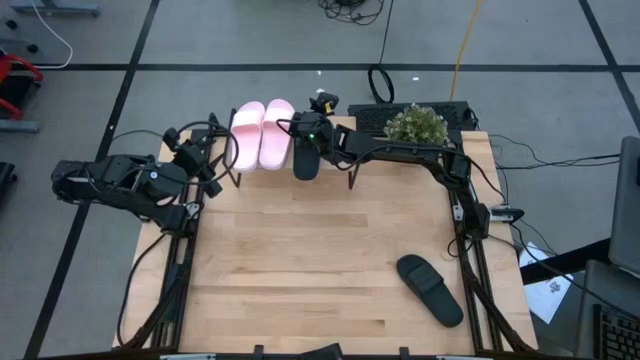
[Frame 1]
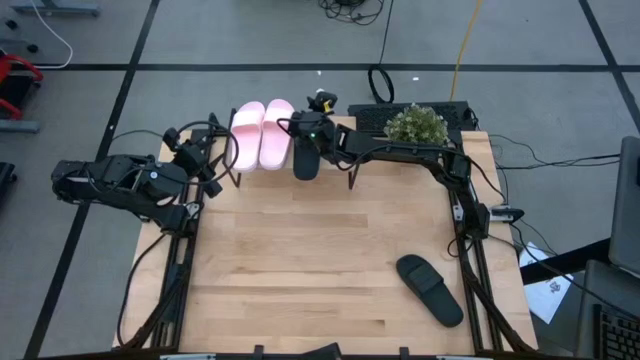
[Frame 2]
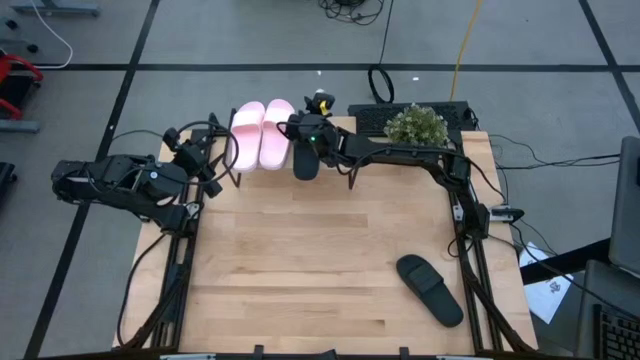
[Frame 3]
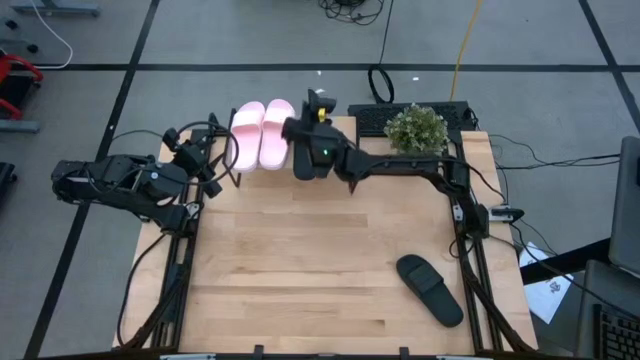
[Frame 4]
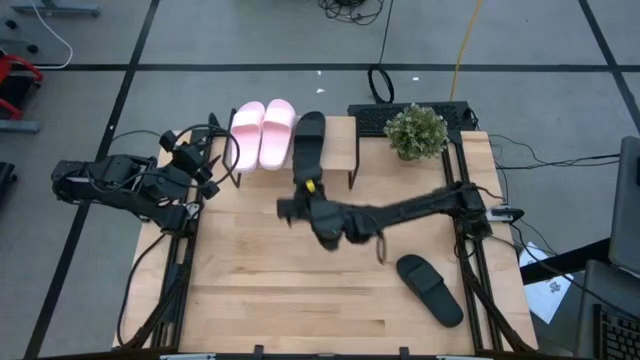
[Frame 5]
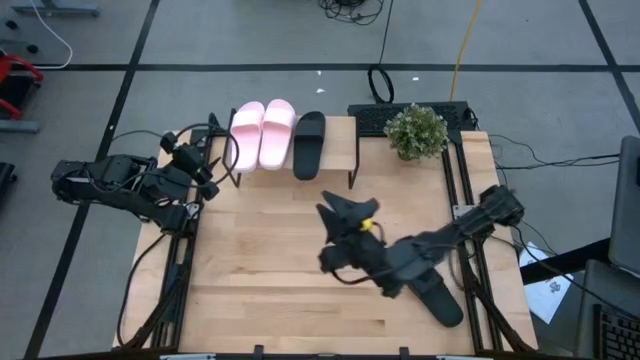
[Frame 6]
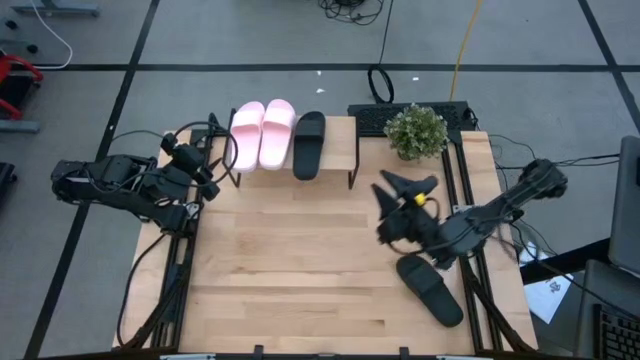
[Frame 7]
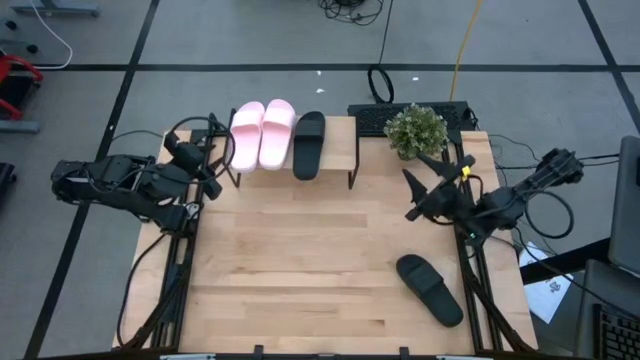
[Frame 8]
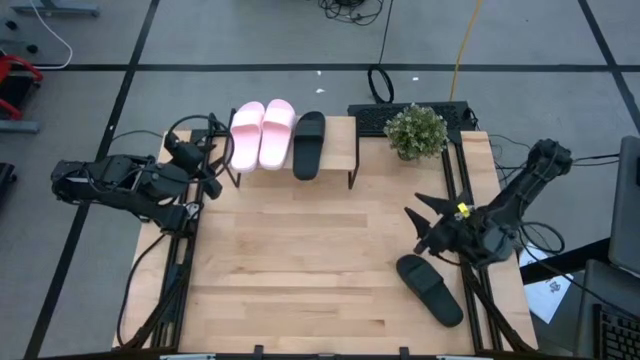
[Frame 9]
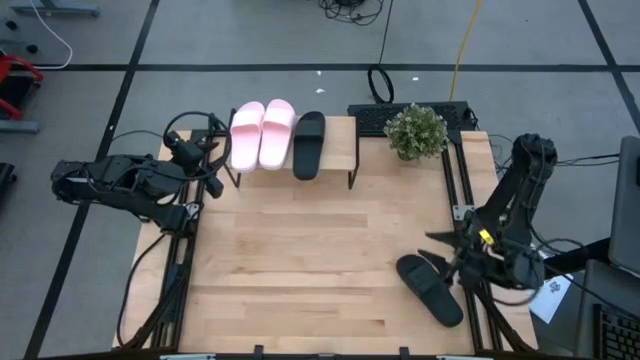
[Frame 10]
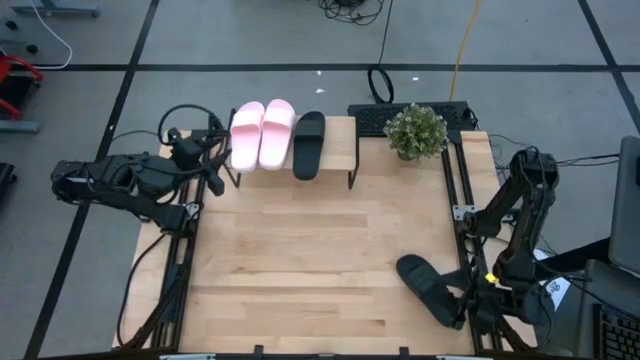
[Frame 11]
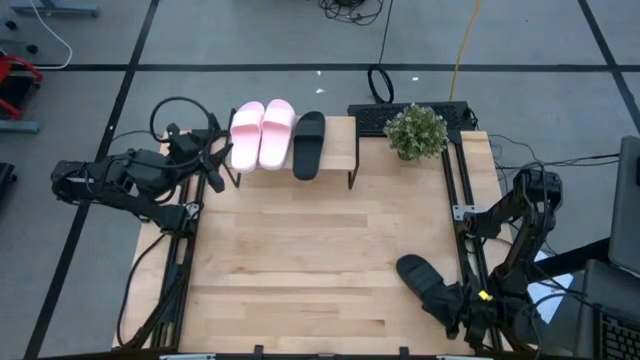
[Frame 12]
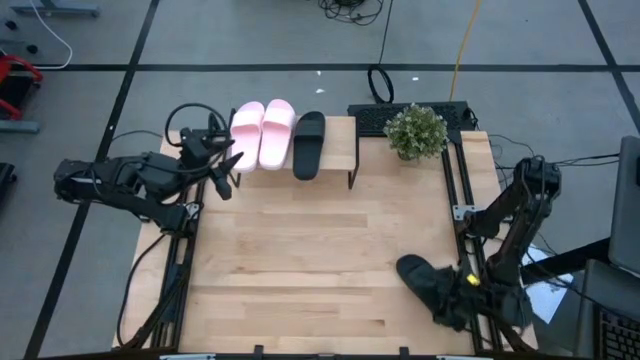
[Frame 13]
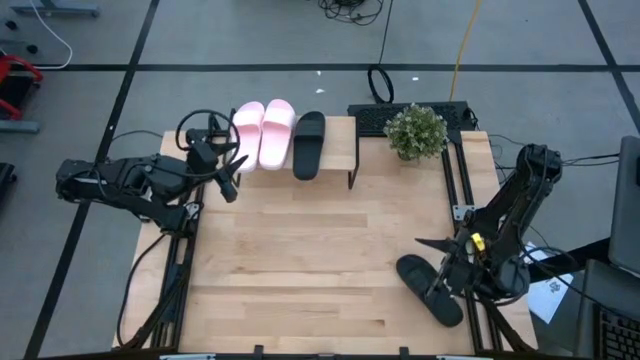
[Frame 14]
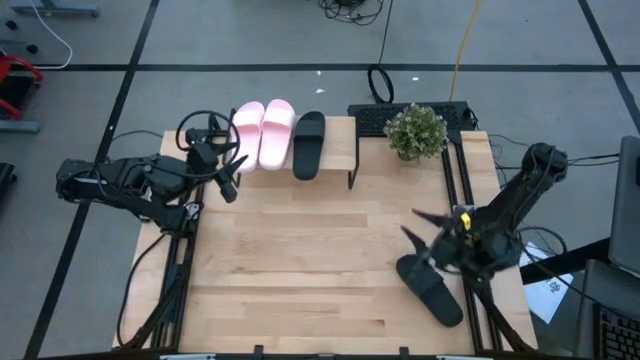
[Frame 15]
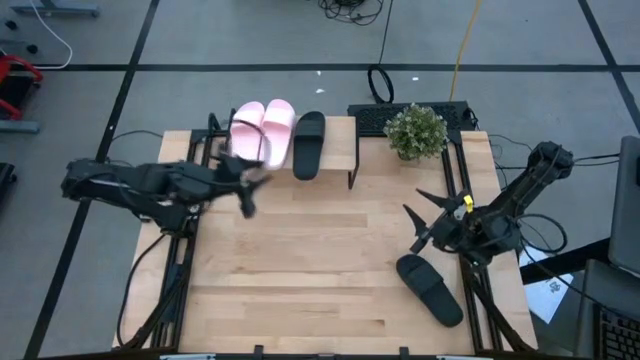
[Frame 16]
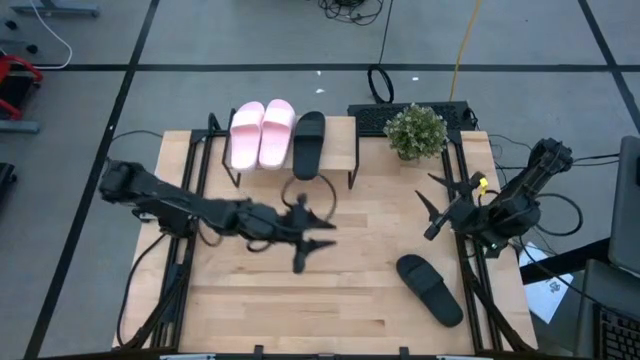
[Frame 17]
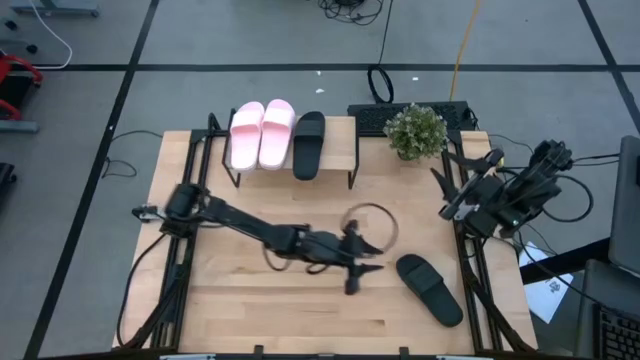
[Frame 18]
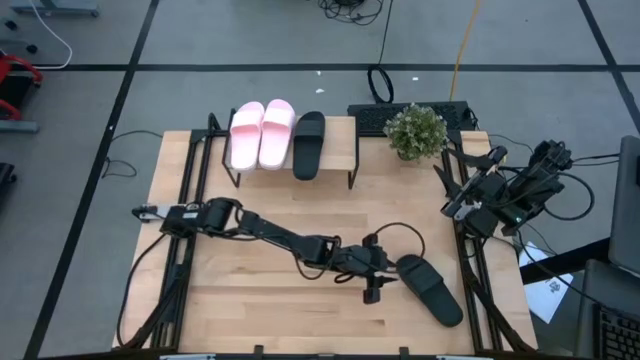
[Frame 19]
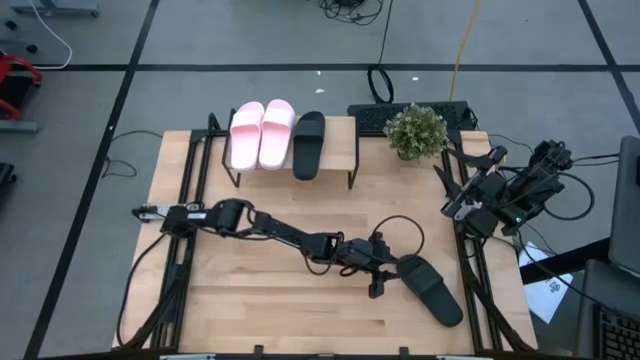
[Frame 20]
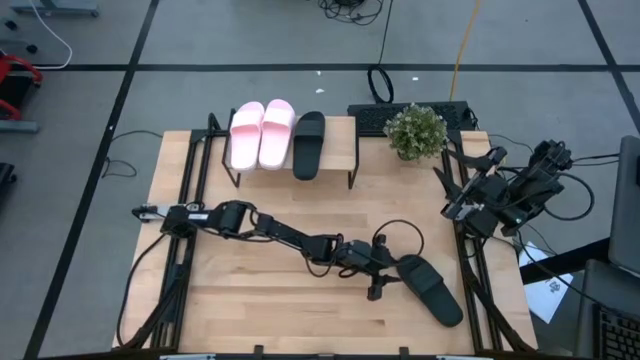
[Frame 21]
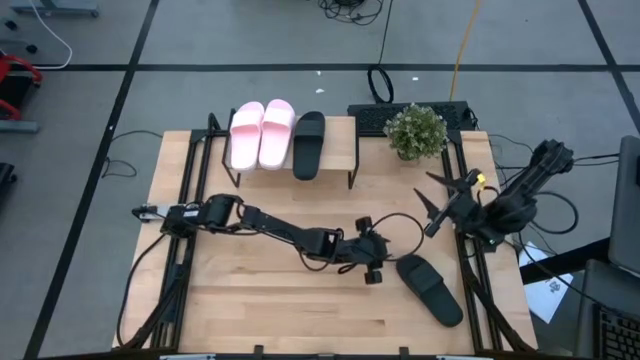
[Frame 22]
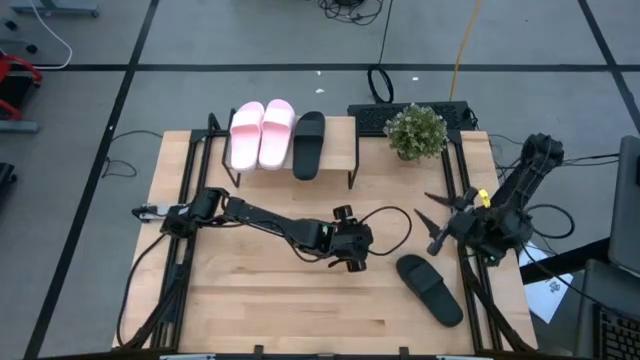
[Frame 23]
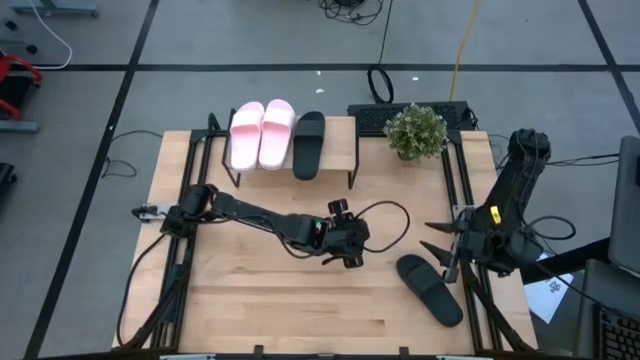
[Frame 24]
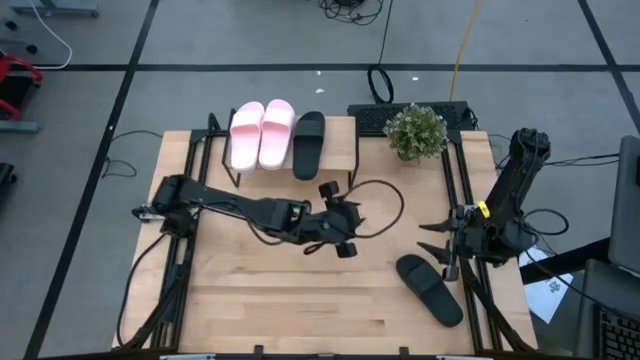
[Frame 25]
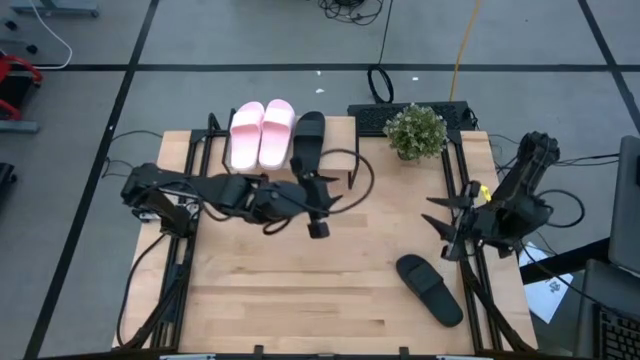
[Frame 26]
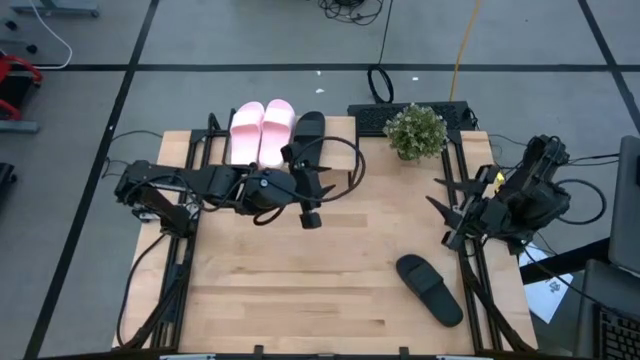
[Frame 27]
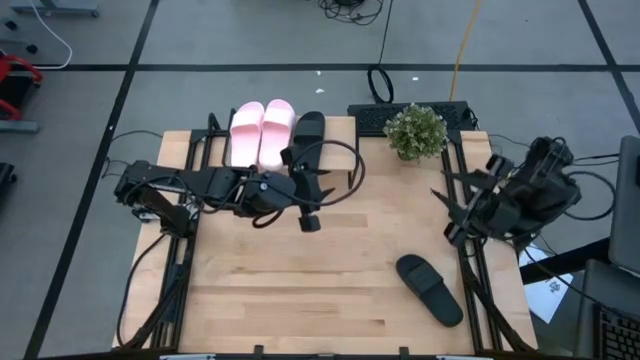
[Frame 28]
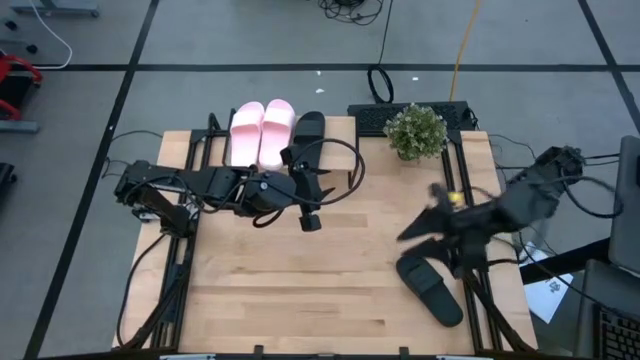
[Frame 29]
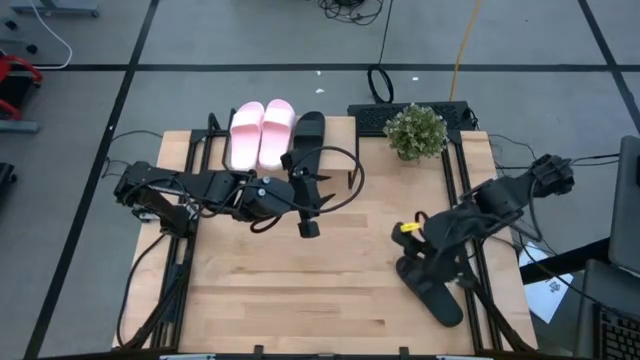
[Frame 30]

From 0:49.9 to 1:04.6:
Task: Pick and place slides into the shelf
Put the black slides on the shelf

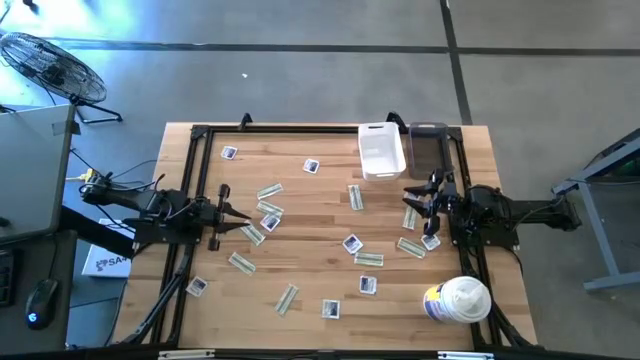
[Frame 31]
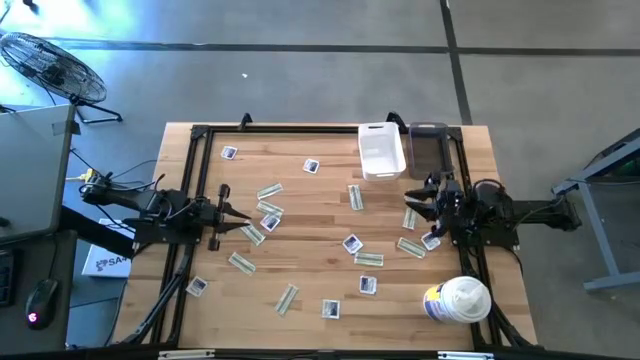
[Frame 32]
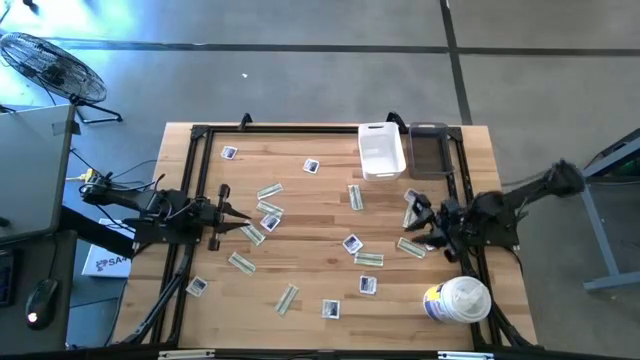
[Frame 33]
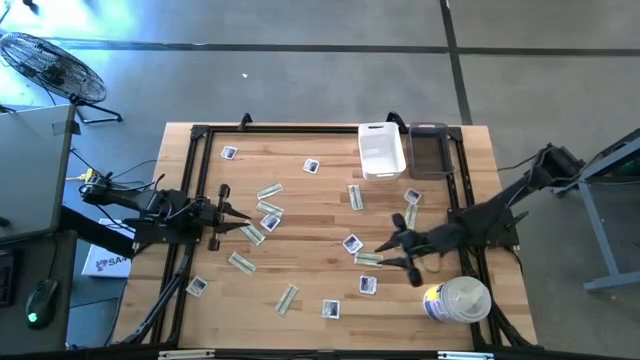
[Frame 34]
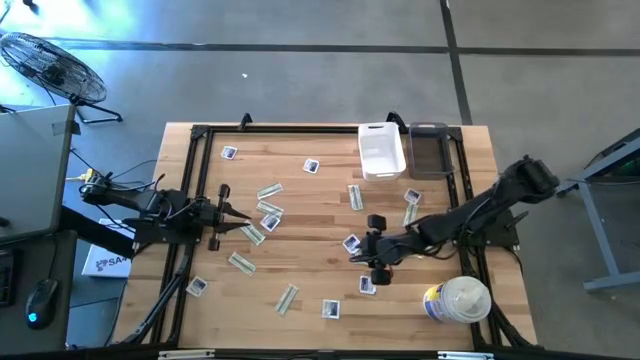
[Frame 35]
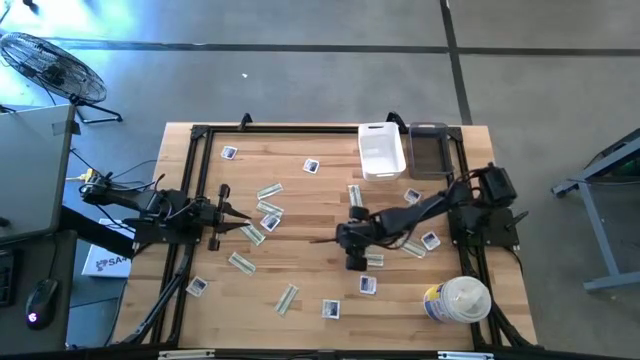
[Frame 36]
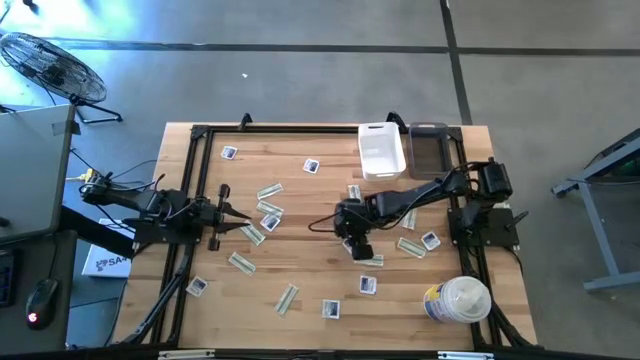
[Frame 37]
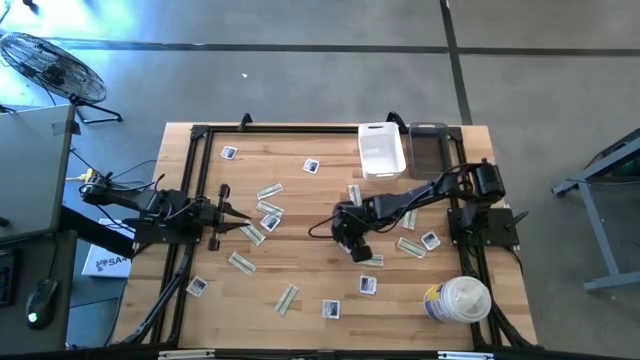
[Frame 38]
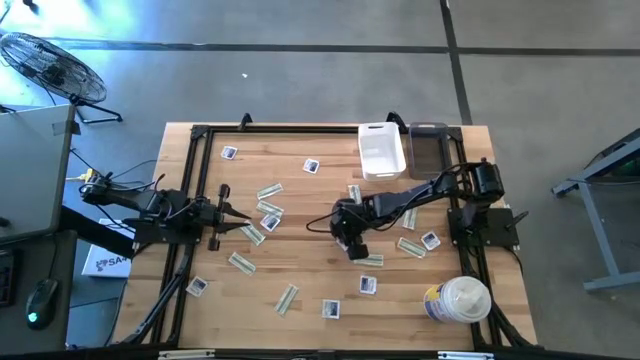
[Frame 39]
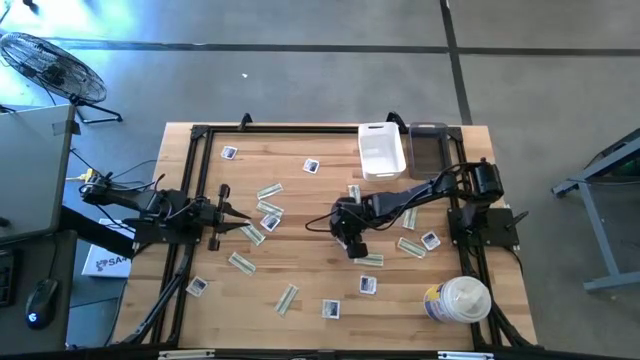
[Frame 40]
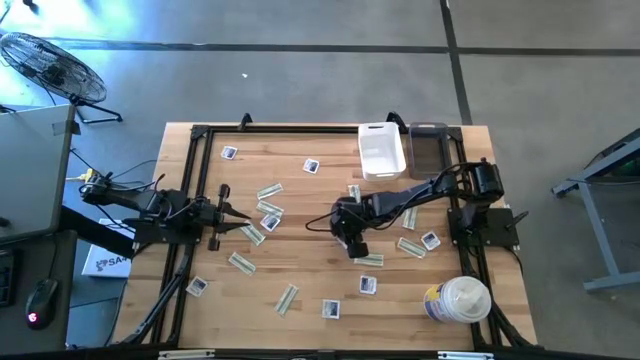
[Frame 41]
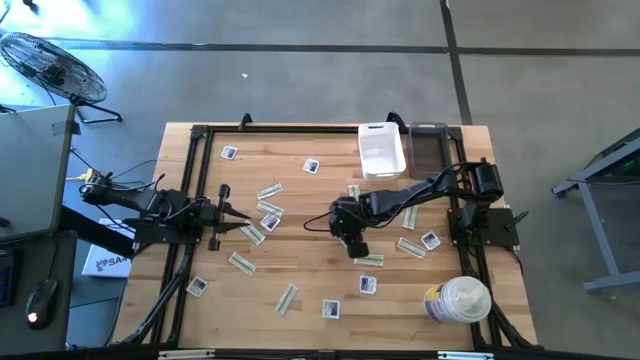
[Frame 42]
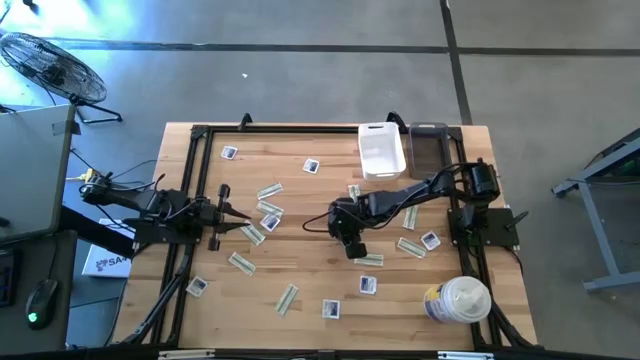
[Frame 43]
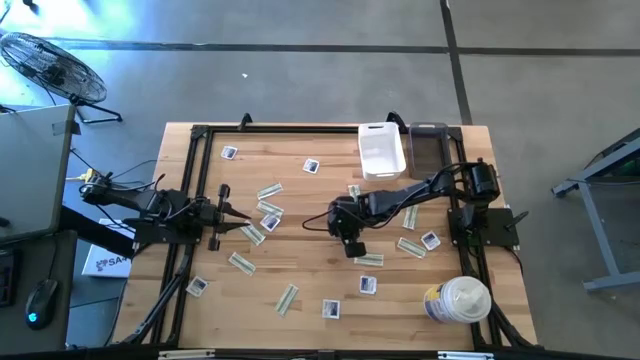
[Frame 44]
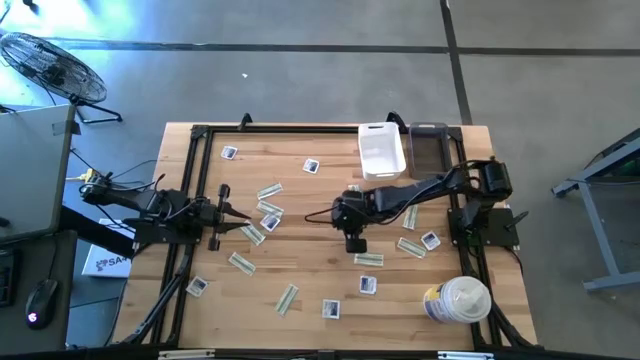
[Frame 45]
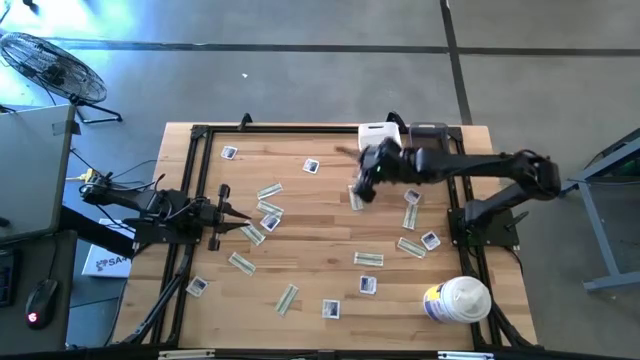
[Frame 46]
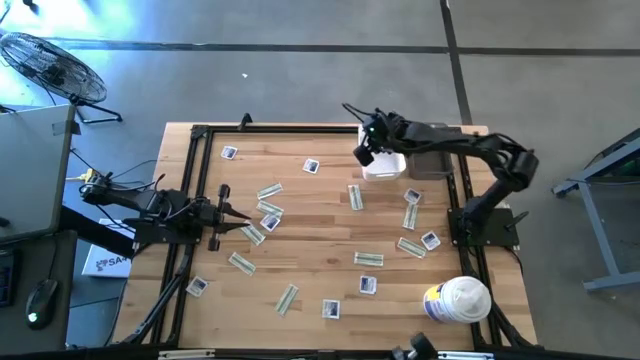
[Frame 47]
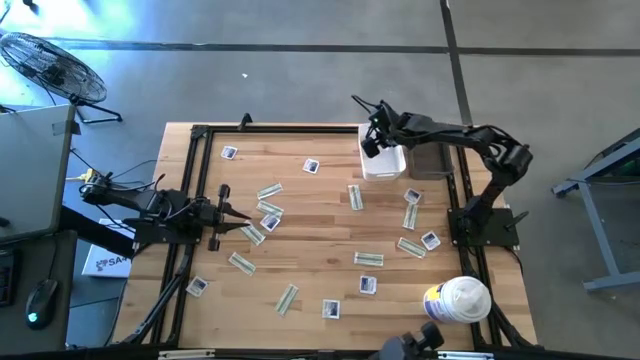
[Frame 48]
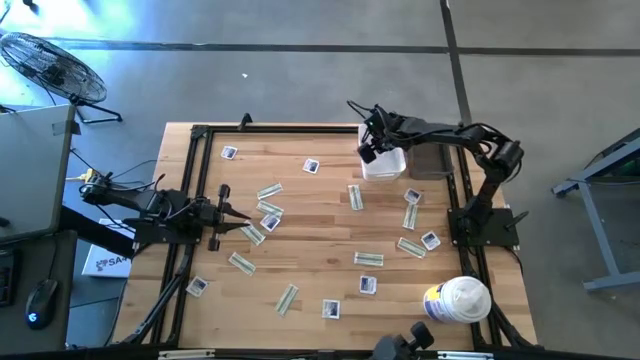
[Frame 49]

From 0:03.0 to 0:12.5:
Task: Pick & Place First Aid Supplies
Put the alcohol pad into the white bin
